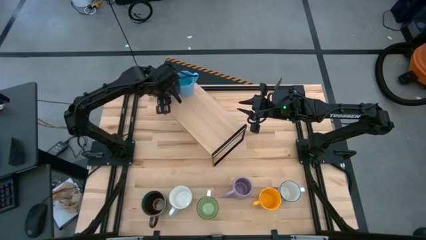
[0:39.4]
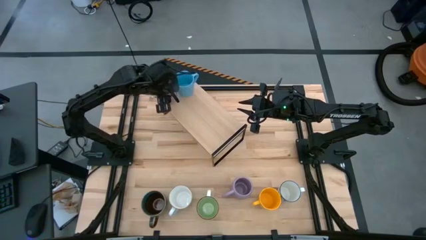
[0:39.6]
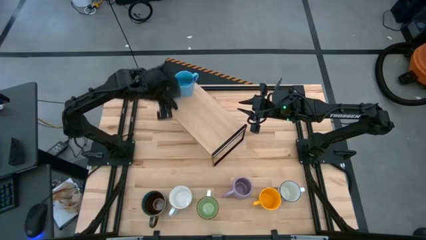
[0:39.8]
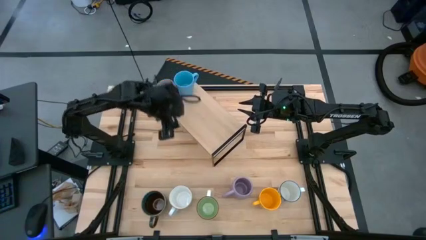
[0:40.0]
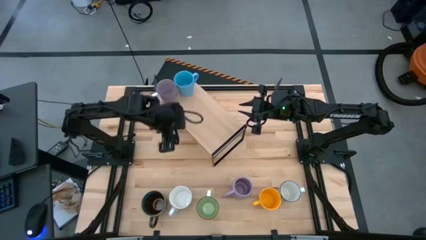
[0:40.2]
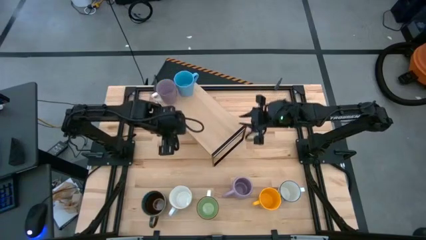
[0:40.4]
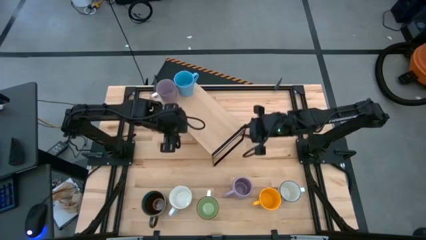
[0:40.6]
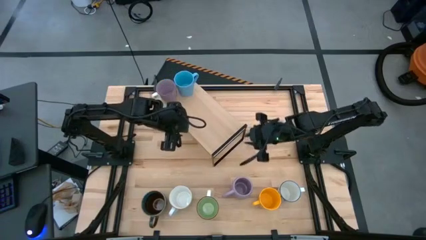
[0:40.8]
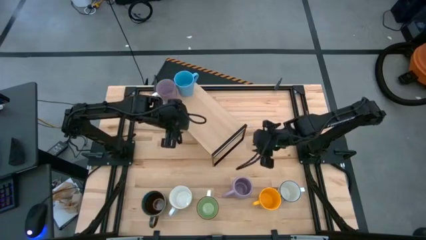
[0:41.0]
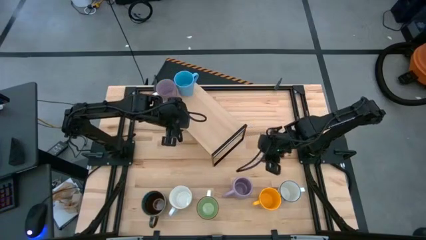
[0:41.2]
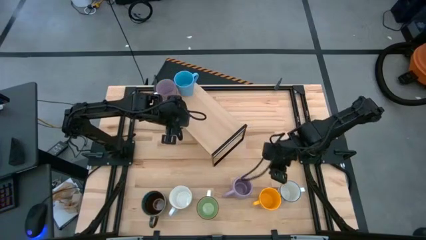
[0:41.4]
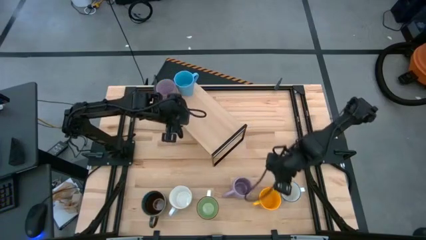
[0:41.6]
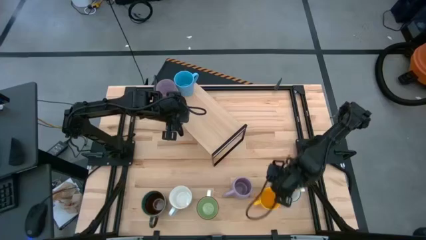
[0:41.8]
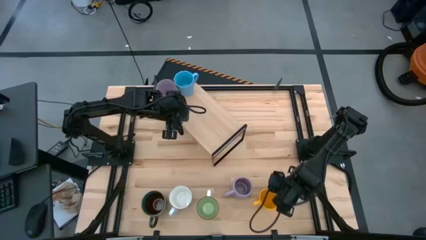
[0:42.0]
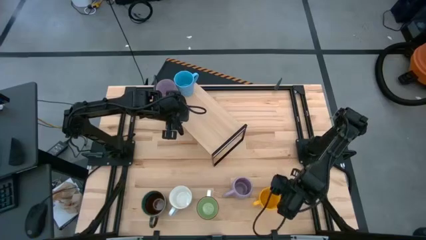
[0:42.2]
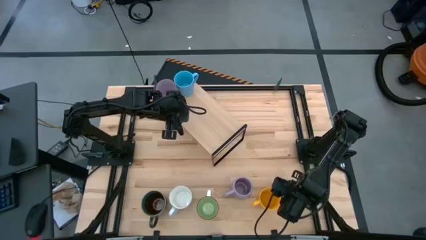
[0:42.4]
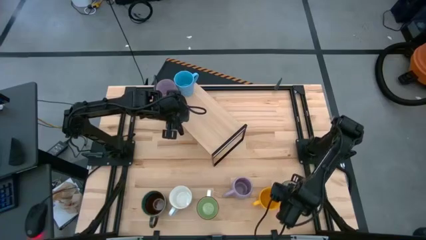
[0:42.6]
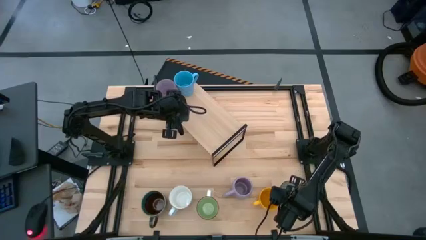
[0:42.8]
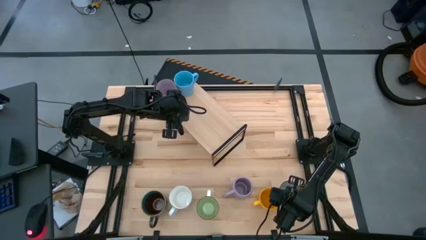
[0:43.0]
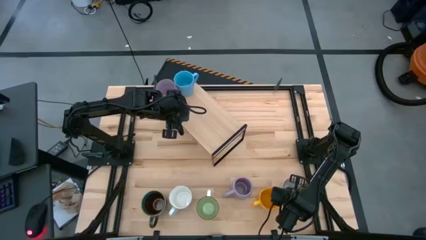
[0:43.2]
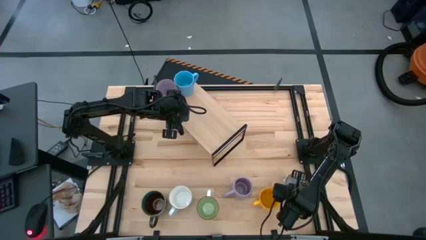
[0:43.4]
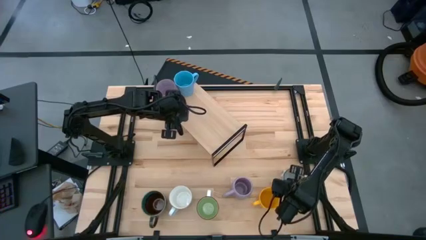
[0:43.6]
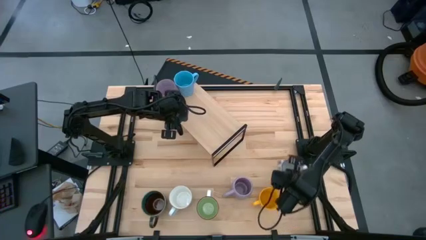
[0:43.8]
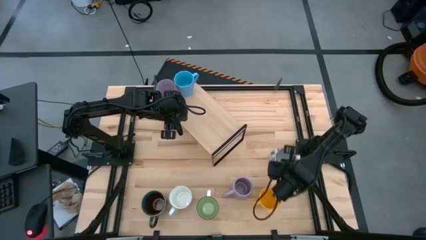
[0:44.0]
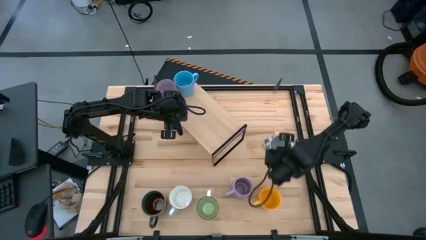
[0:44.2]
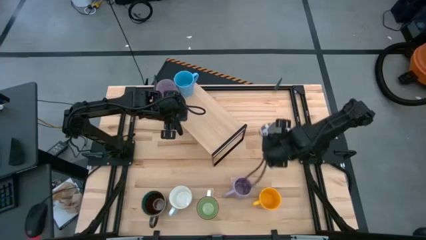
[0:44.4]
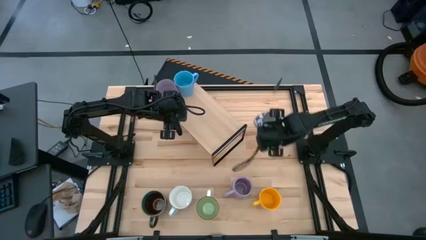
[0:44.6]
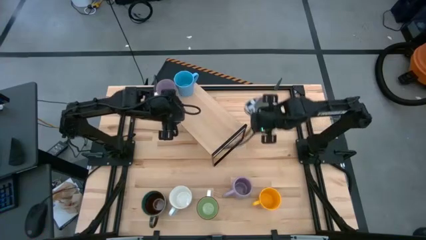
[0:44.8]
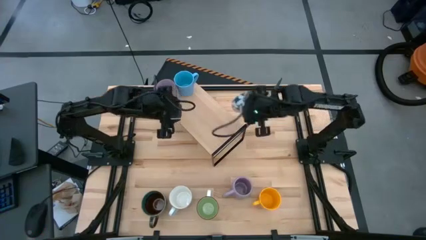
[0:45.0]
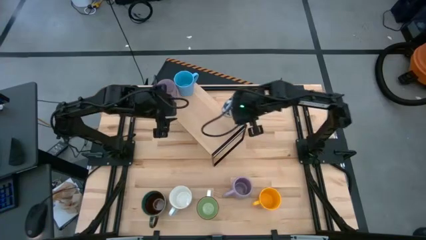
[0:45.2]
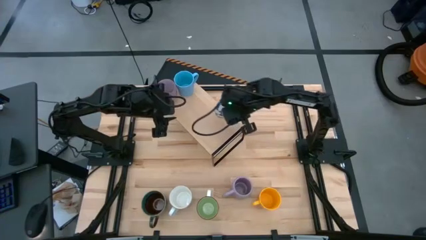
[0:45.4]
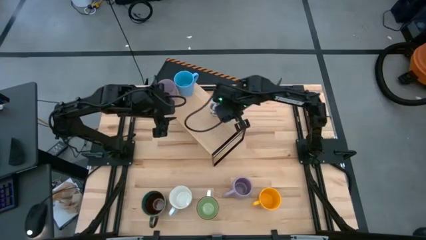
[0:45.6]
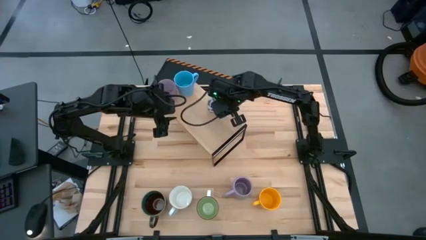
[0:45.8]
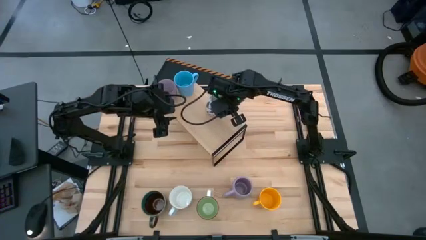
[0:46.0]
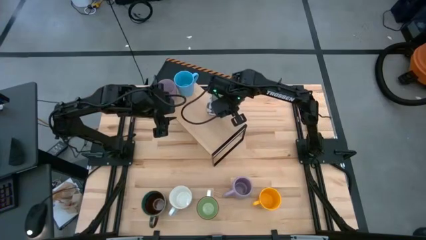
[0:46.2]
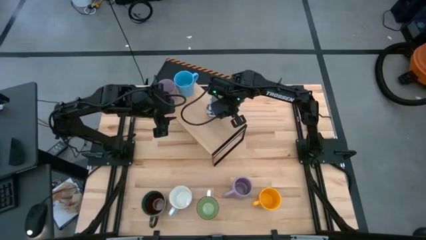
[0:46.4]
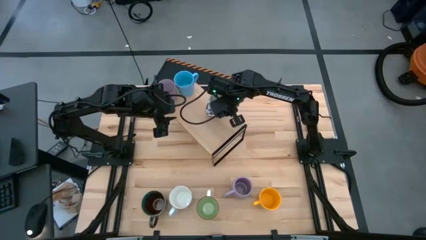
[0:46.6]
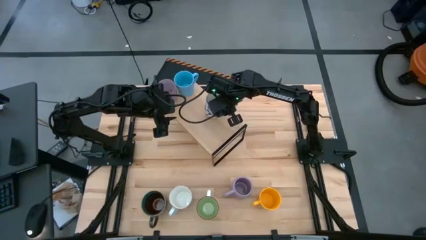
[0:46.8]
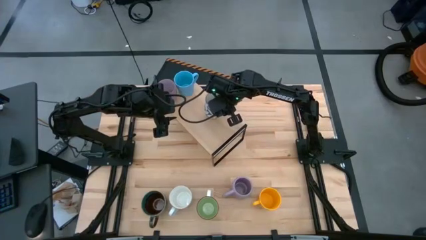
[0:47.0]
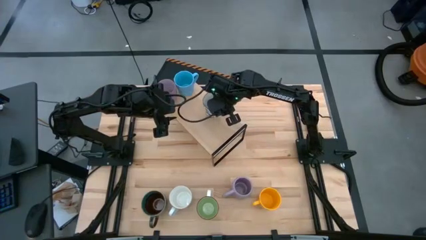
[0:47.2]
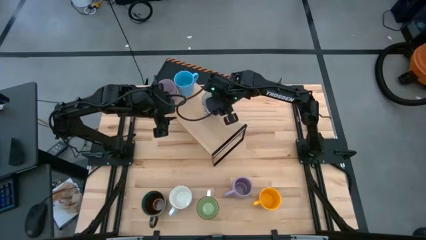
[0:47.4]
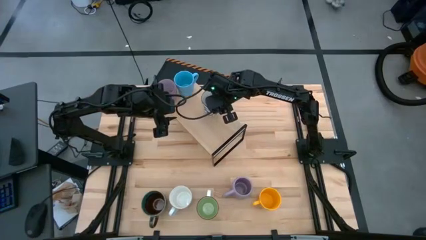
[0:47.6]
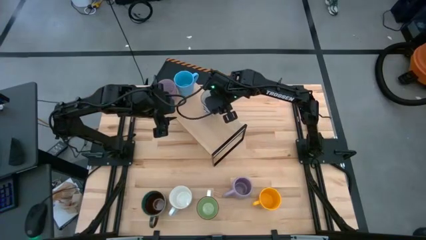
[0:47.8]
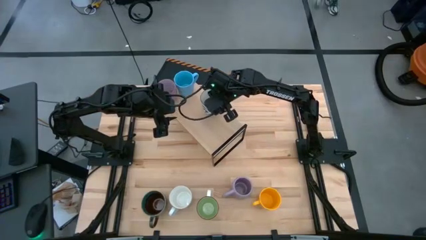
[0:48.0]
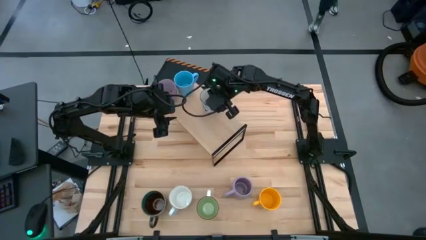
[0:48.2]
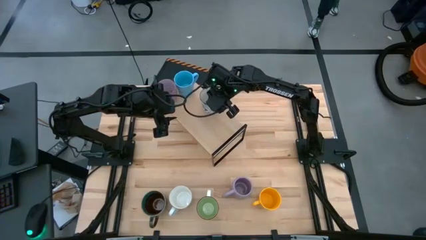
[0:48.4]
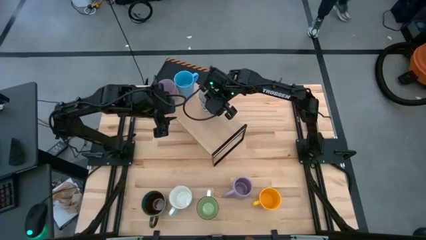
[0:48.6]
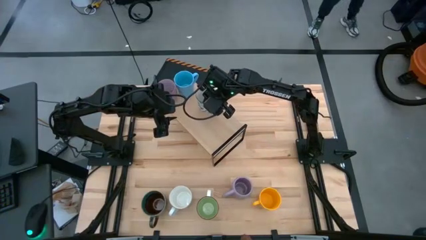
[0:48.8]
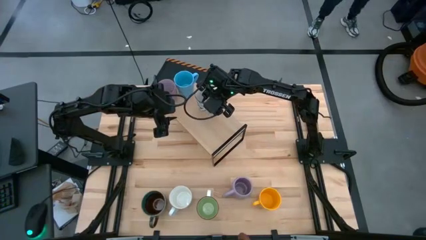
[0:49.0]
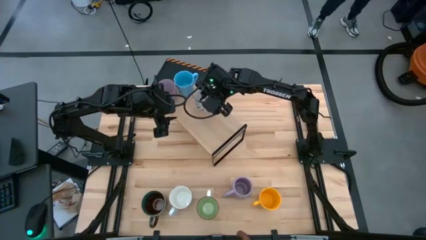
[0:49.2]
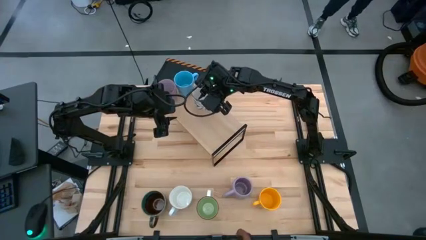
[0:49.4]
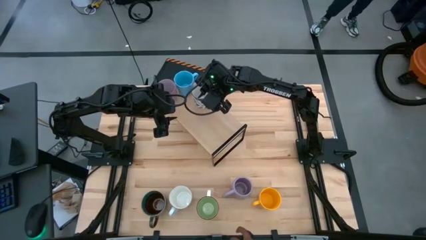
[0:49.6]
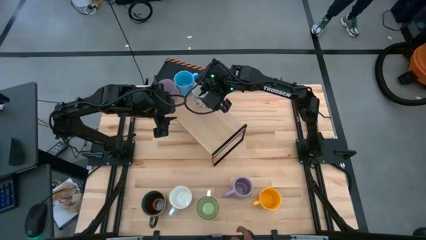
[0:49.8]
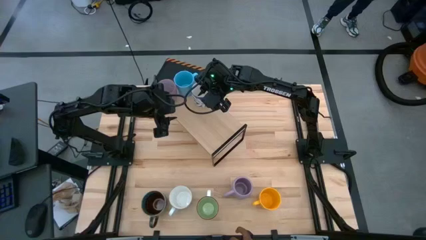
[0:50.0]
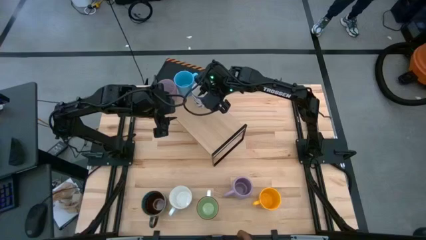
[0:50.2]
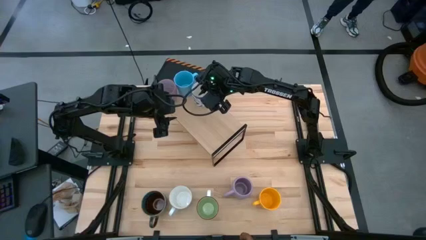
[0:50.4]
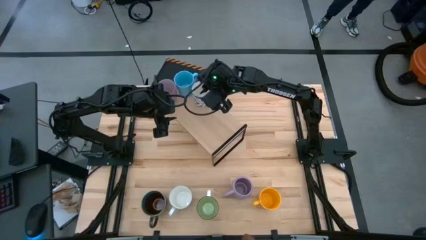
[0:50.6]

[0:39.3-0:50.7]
Task: Place coffee mugs
Put the blue mug on the shelf

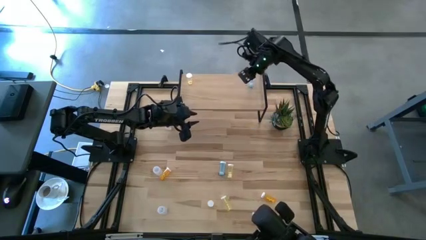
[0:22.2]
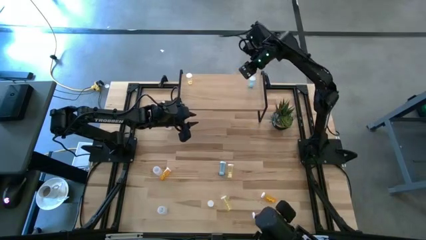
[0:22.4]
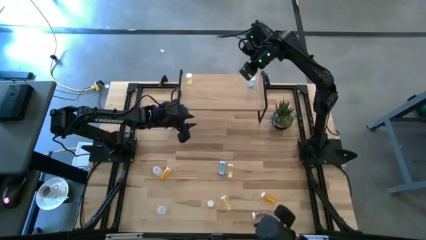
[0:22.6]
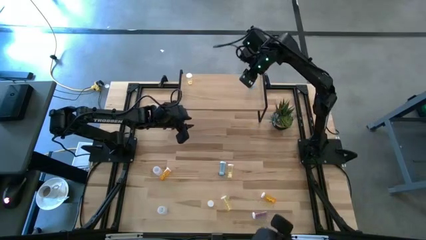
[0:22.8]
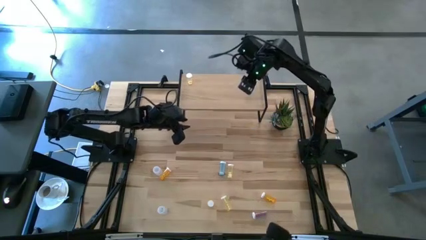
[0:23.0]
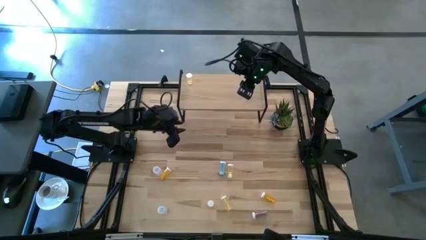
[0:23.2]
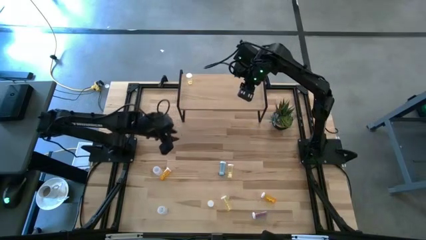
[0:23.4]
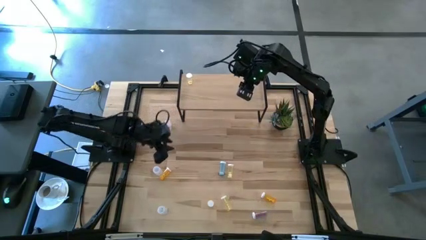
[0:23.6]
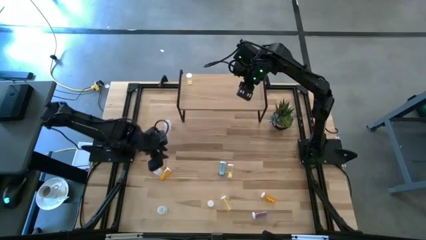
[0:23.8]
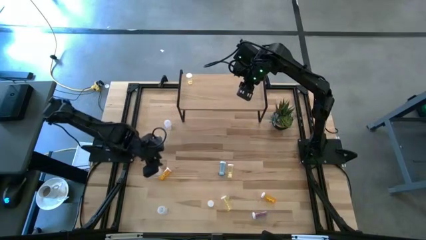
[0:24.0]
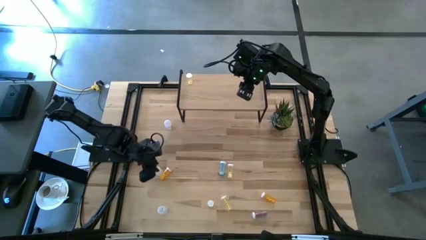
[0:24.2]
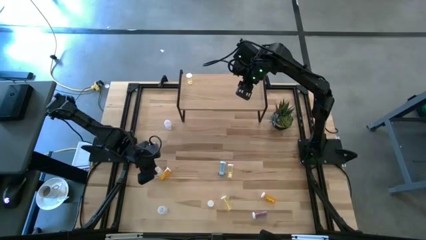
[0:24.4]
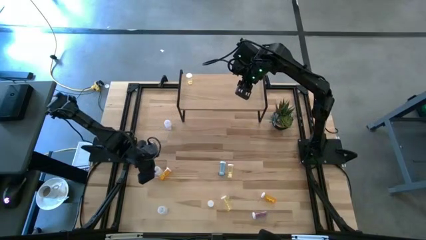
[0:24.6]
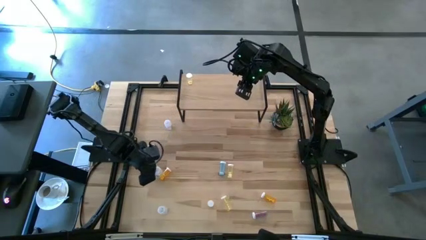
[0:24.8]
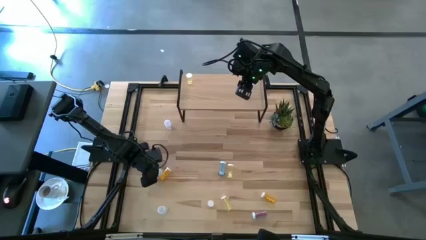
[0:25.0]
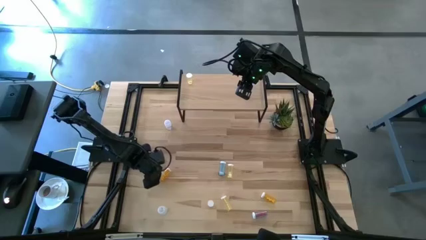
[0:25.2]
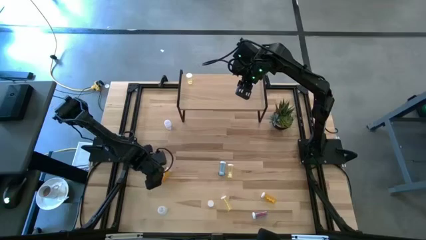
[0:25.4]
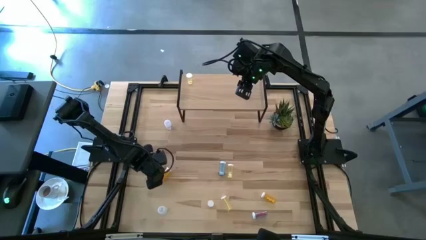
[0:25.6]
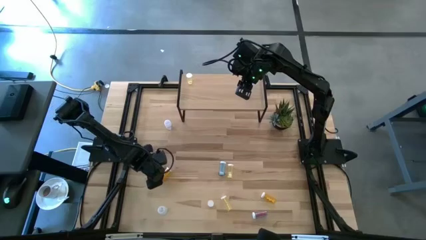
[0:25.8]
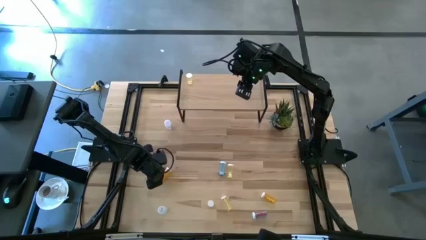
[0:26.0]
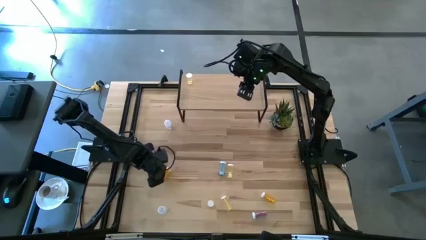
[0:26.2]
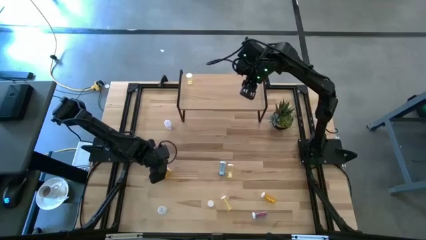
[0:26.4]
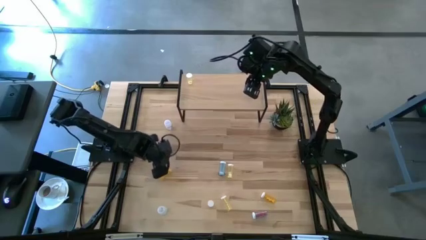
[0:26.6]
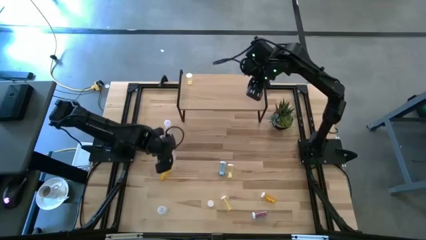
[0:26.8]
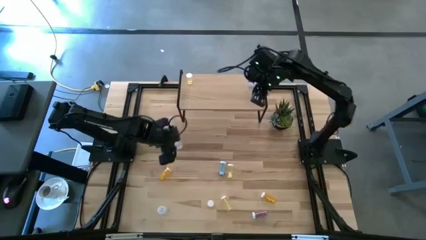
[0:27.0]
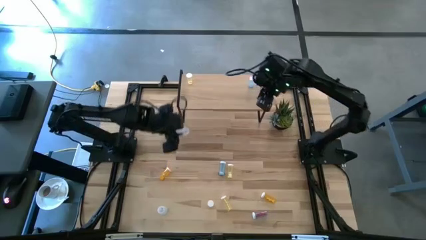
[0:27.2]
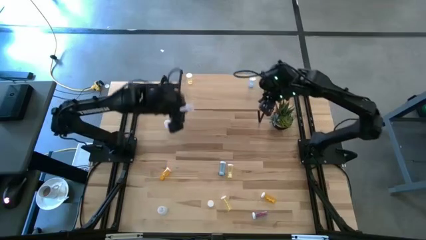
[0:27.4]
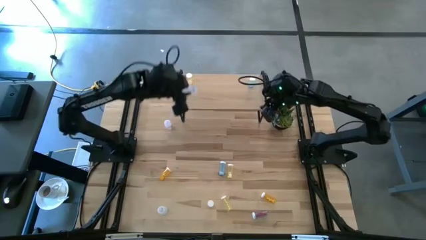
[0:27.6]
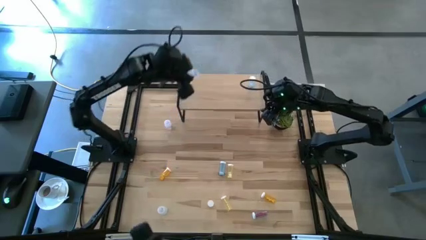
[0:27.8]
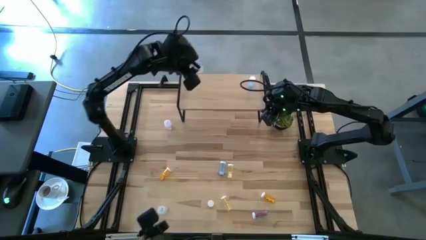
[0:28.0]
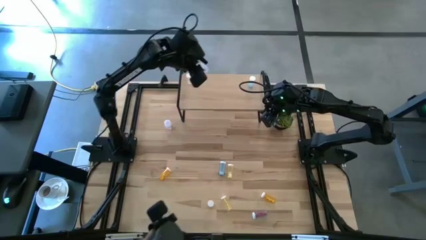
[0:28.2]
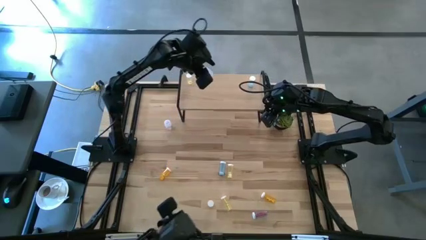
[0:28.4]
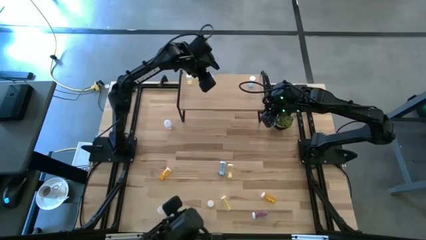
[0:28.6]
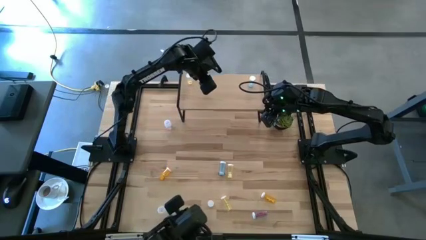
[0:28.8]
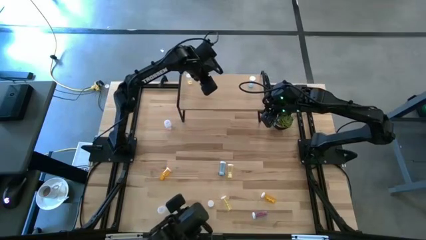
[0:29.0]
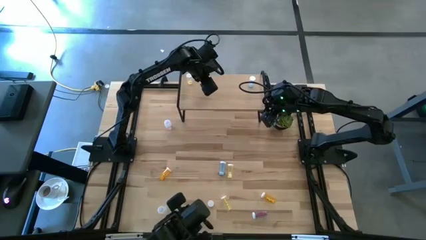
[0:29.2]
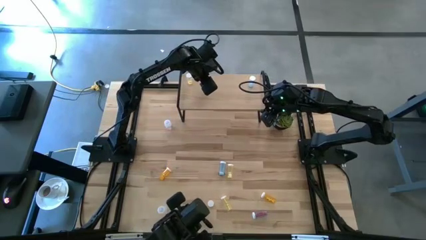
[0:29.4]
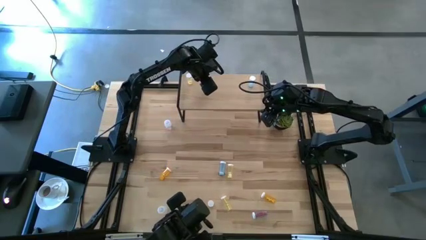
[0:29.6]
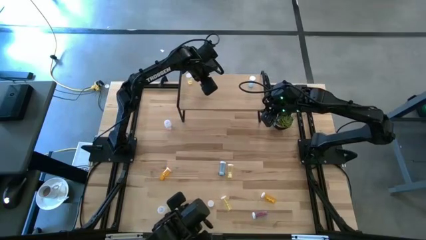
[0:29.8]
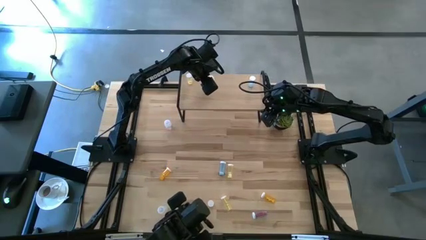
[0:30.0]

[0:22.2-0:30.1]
Task: Pick and place medicine bottles onto shelf by color
Put the middle transparent pill bottle on the shelf
